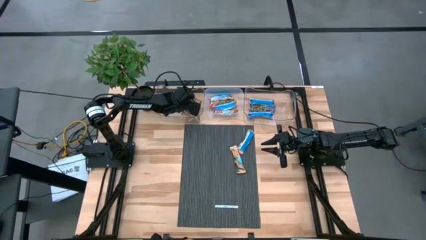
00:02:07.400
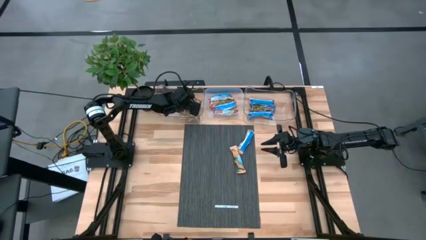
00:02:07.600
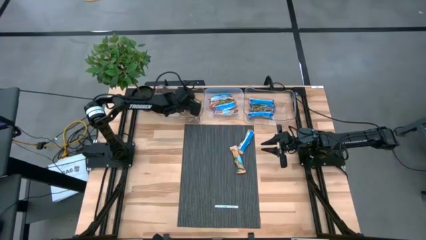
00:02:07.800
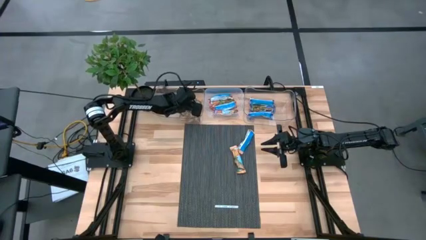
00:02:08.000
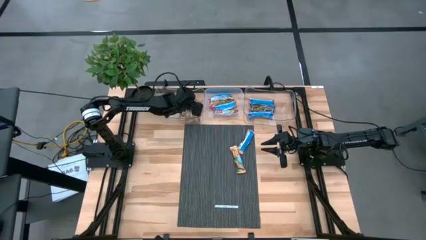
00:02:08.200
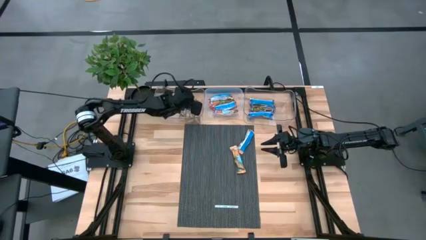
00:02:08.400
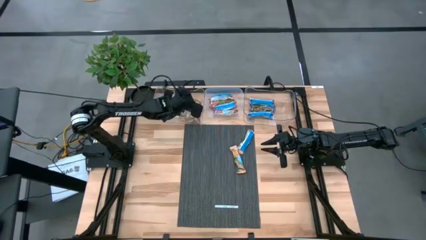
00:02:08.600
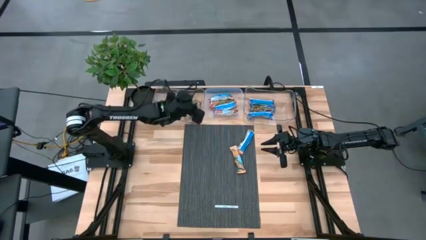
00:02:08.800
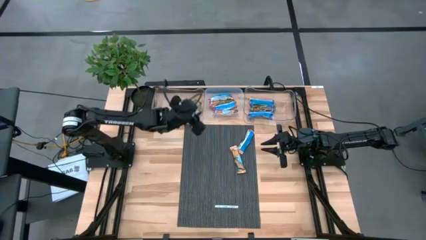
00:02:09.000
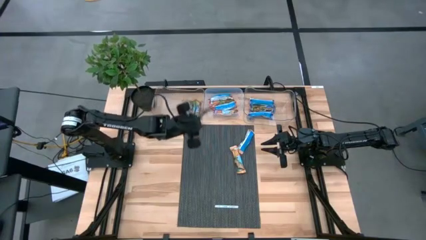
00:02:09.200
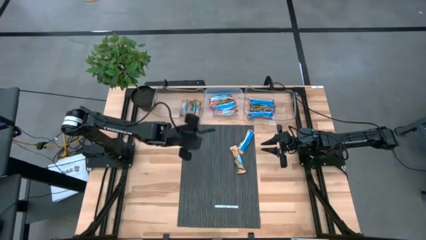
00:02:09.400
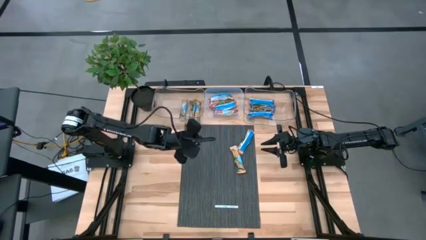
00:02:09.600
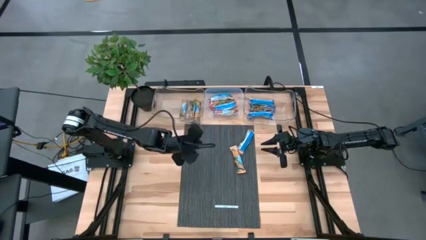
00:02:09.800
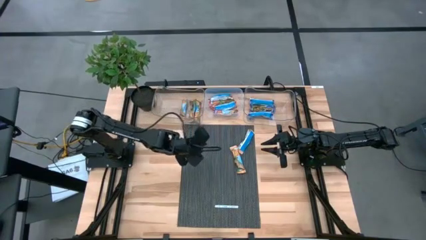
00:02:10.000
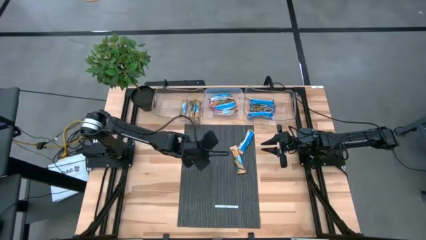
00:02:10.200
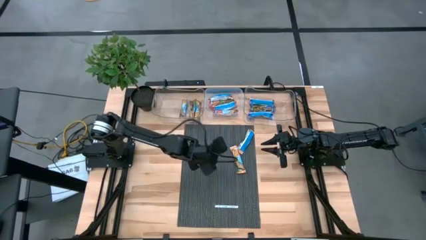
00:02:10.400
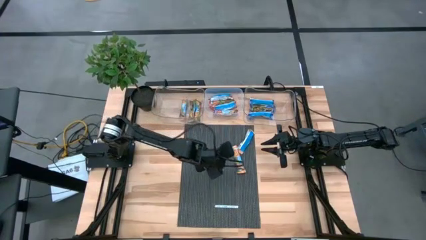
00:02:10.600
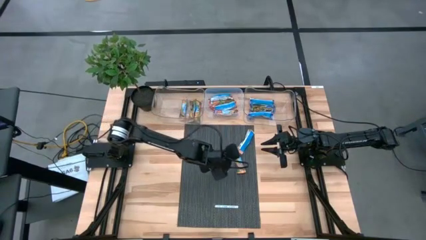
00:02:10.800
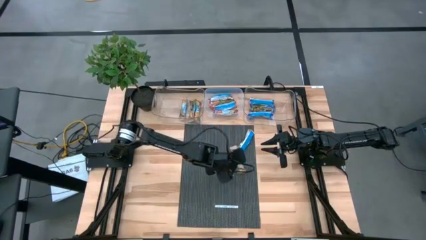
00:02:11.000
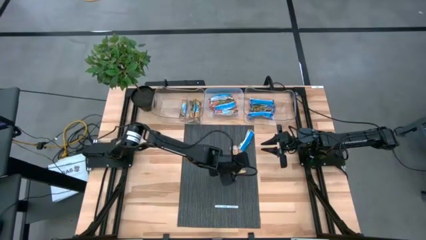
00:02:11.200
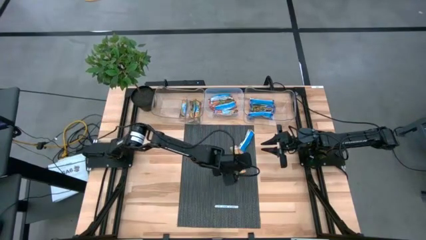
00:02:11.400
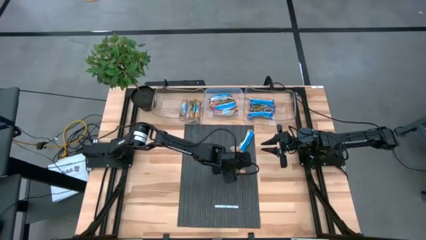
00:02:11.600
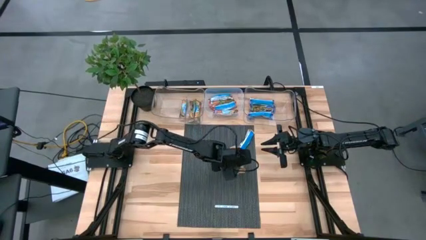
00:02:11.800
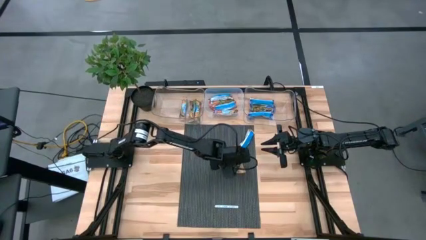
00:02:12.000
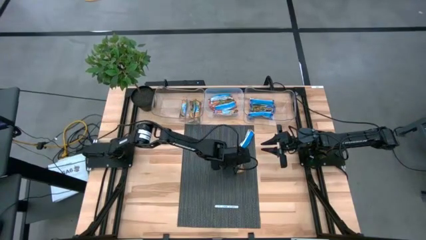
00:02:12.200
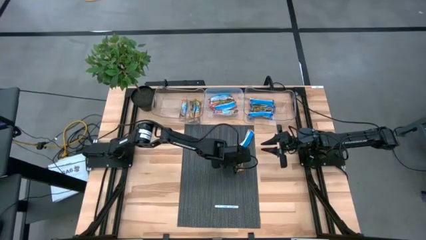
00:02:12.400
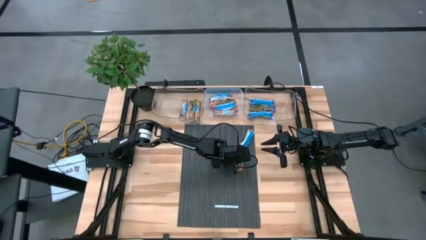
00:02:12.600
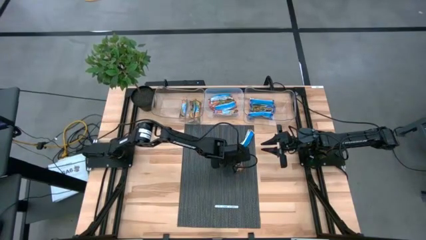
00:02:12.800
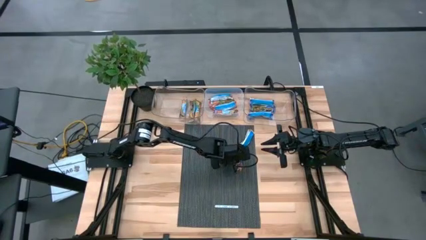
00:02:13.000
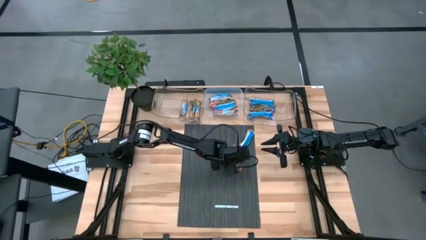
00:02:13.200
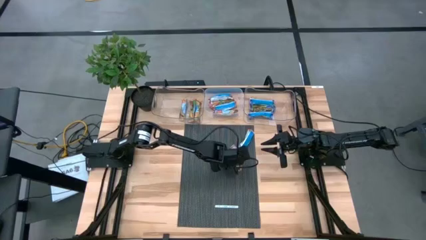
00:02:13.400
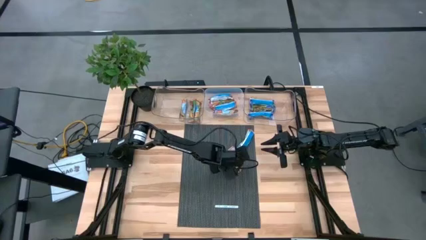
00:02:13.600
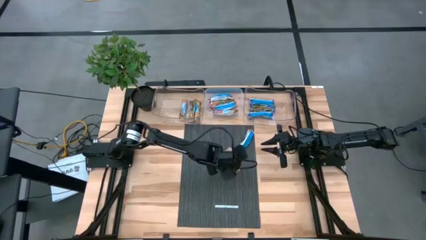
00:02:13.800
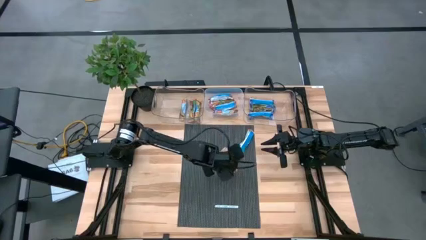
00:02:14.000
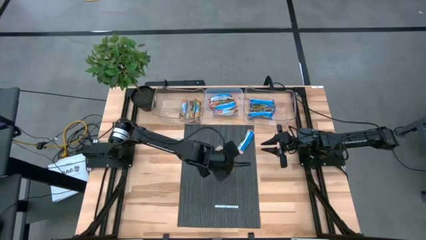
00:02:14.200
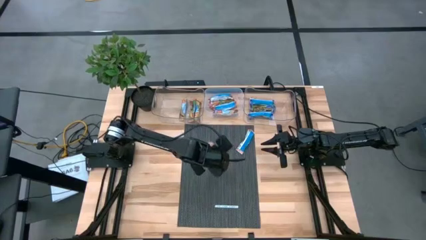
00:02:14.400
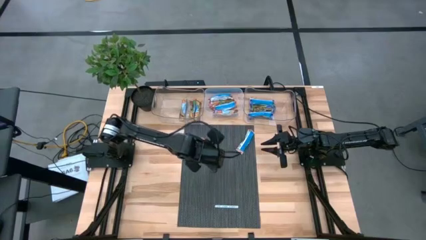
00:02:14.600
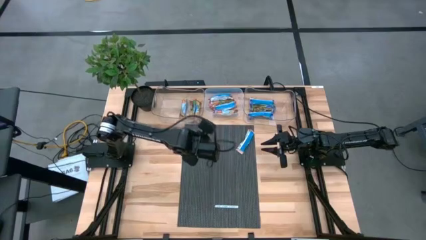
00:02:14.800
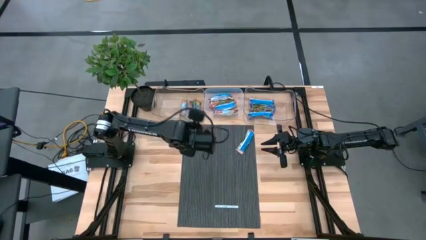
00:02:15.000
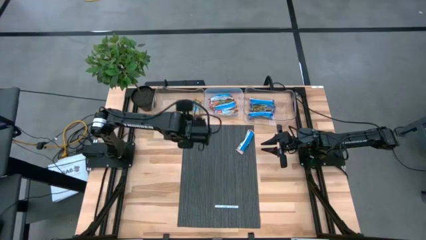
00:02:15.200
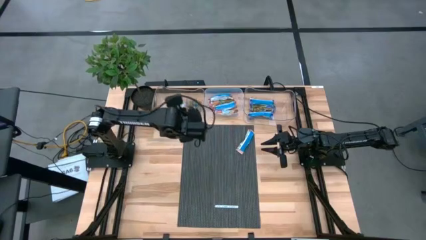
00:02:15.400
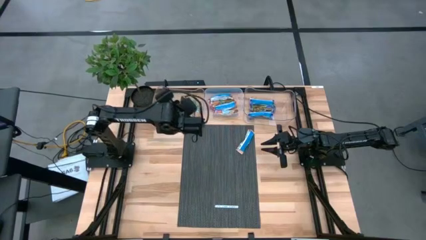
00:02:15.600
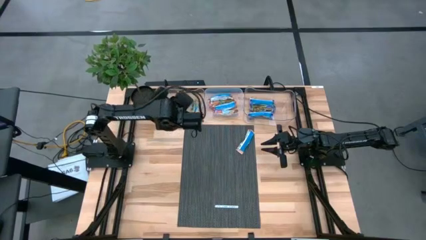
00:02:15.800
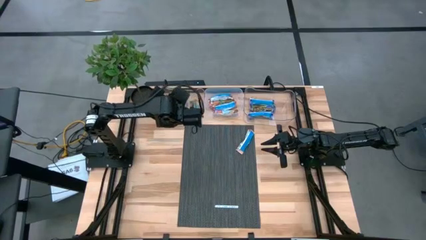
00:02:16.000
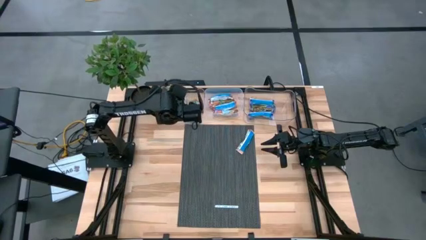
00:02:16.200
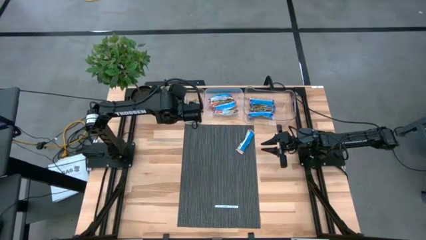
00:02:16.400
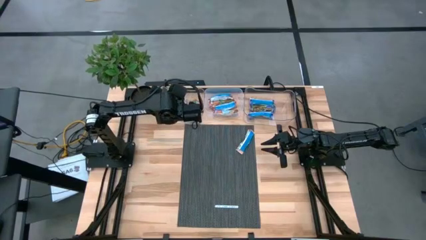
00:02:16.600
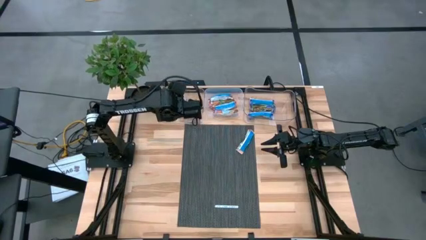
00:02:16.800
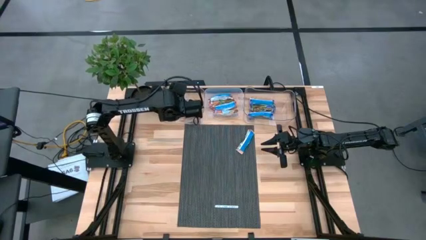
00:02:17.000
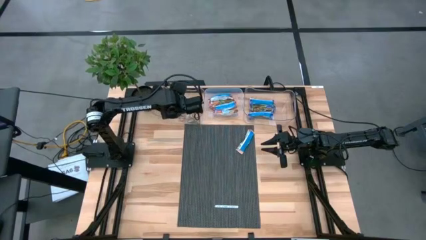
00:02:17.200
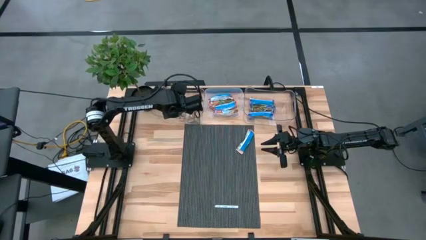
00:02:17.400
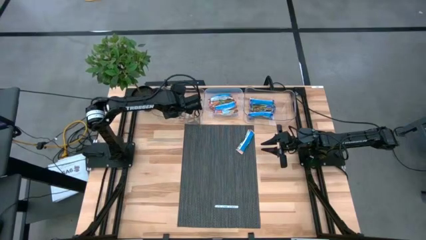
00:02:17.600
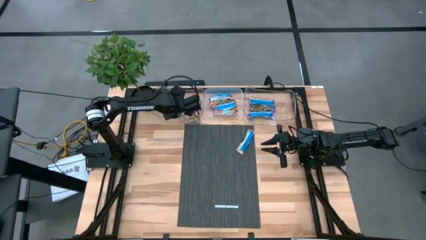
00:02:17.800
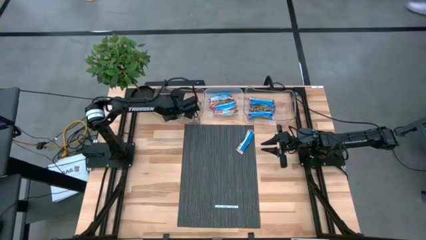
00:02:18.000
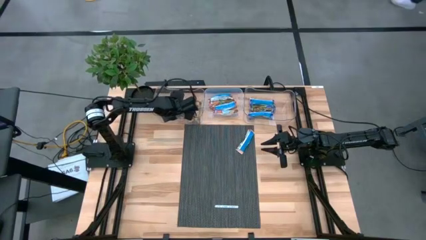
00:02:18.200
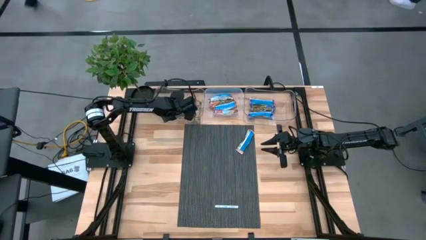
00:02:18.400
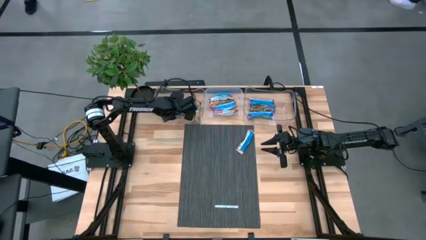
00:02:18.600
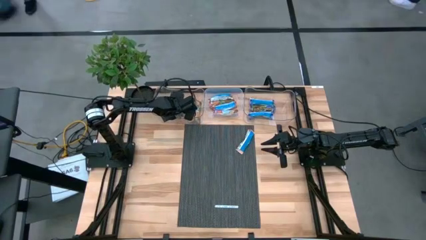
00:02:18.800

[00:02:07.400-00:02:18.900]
Task: Pick and place Granola Bars by type
Put the bottom orange granola bar into the left transparent bin

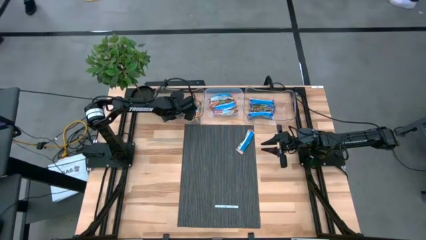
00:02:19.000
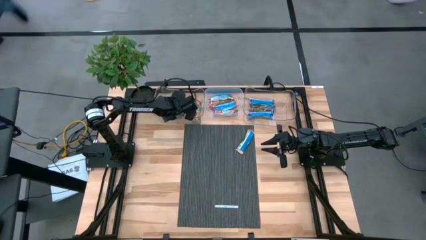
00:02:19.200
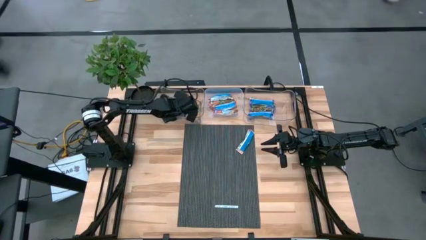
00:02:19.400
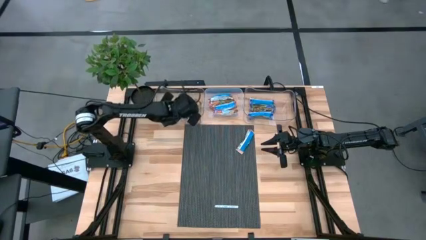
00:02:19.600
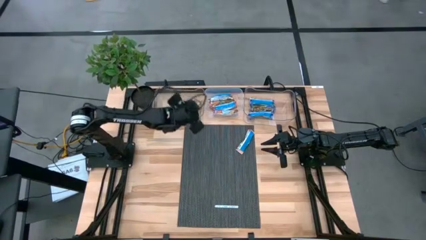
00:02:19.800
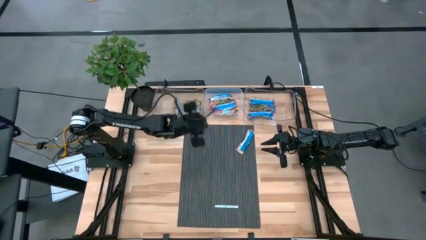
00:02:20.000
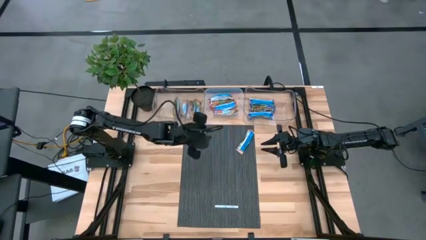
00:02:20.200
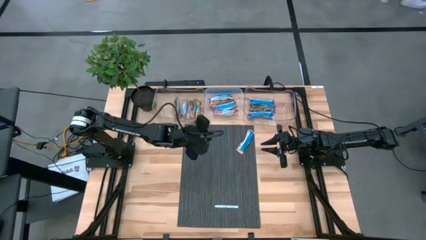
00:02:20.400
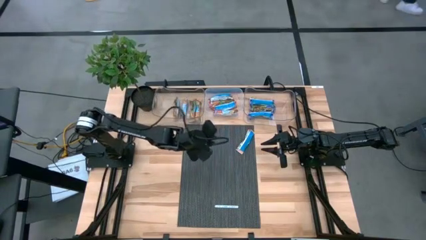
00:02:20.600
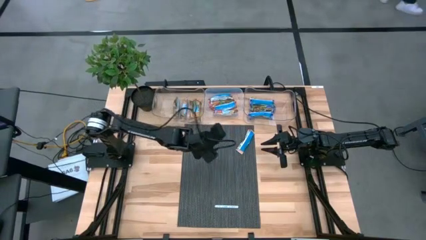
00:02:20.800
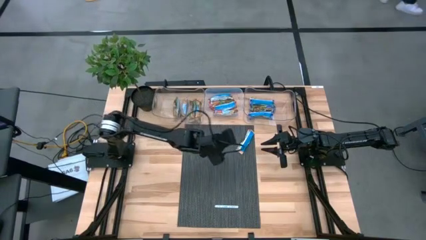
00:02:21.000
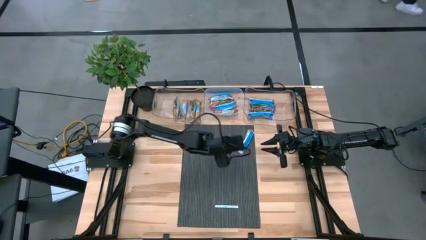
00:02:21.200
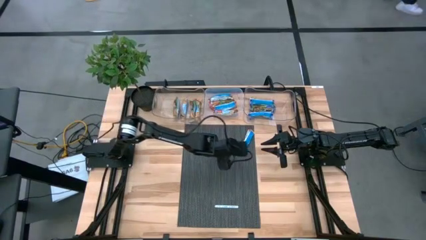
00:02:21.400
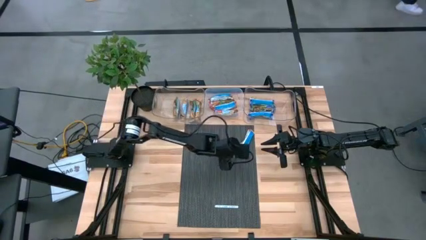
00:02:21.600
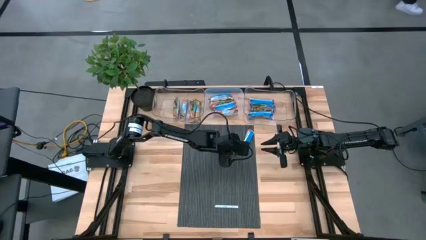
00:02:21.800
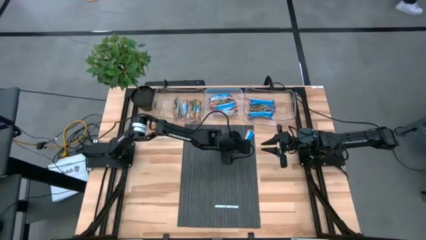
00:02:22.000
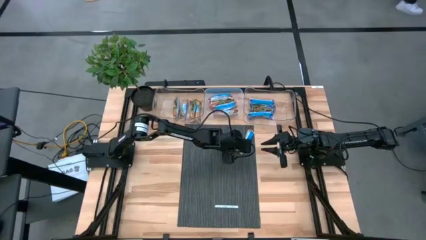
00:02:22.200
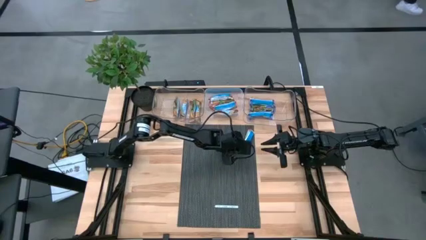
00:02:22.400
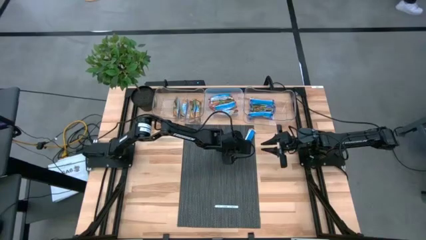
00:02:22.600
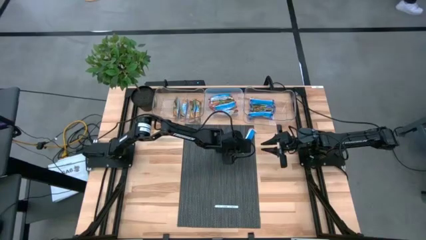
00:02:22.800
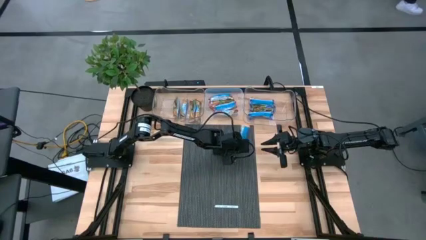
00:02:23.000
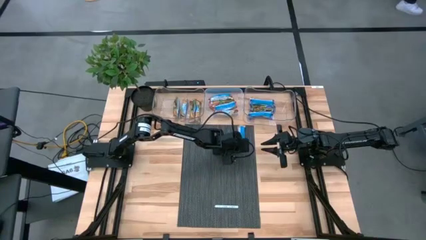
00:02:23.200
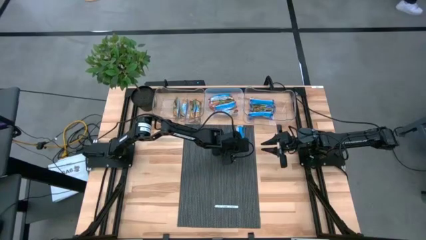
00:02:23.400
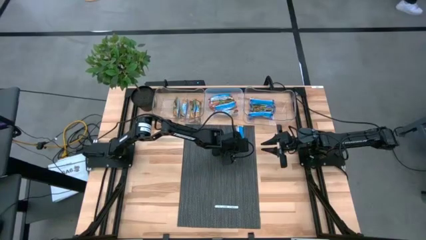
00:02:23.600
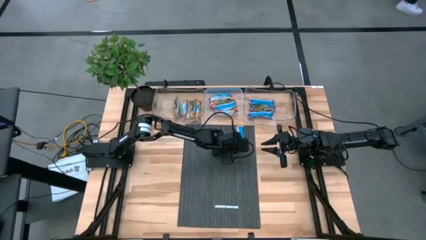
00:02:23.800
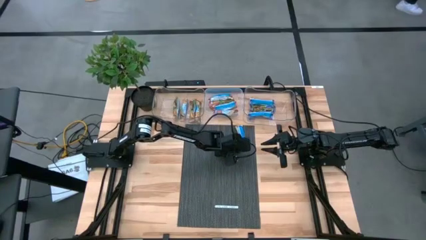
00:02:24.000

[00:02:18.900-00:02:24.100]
Put the orange granola bar into the left transparent bin

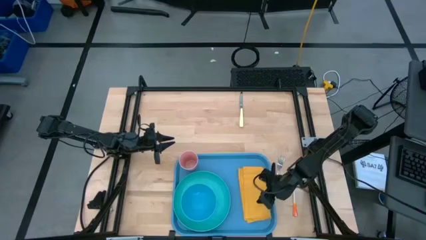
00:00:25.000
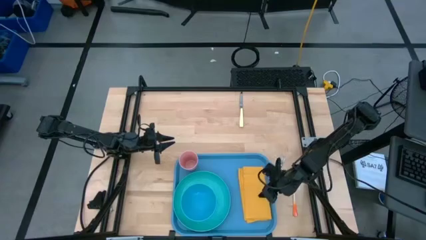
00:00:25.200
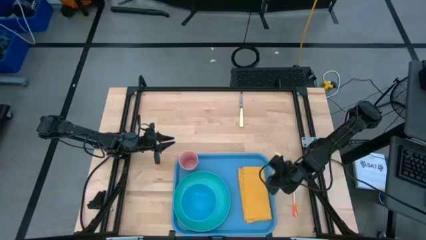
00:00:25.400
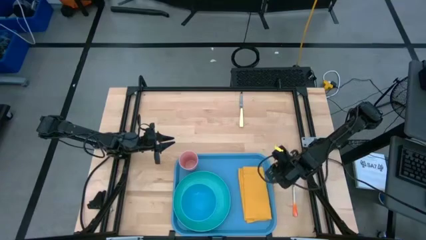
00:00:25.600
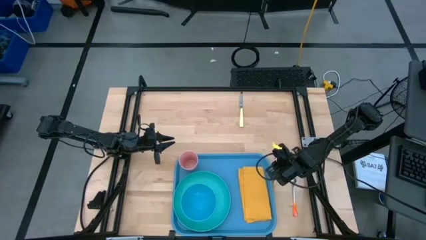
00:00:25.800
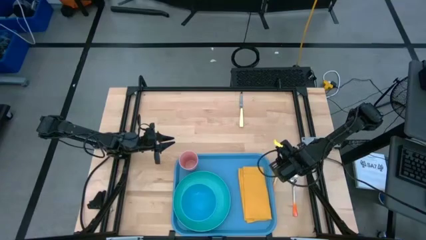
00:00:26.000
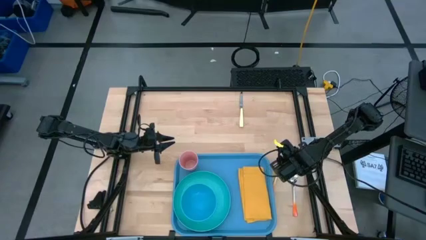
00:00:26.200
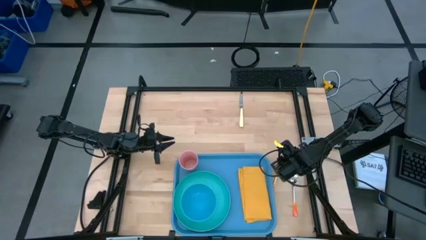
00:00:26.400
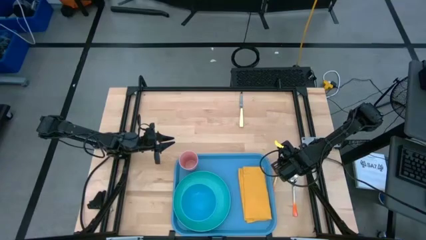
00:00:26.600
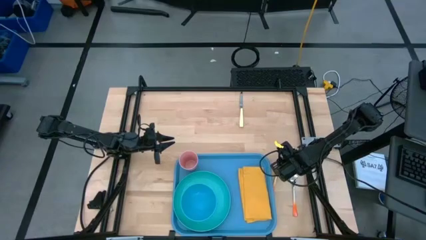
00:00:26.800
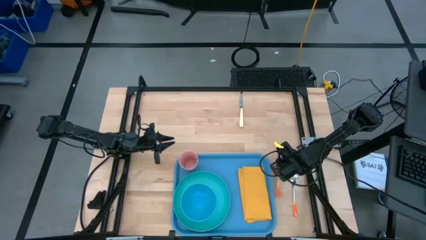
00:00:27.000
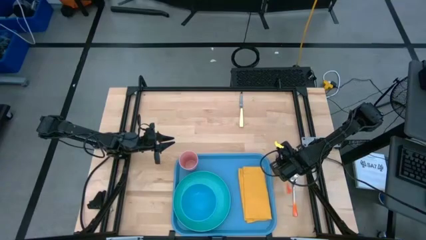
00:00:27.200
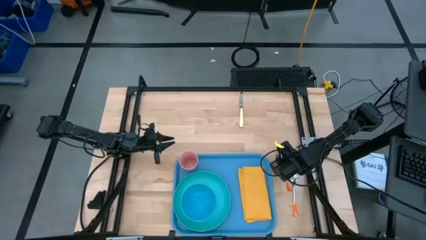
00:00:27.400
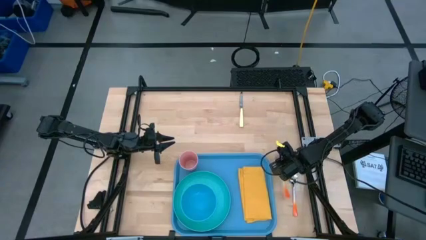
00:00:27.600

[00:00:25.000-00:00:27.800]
Task: Set up tray
Put the orange fork on the yellow table napkin
